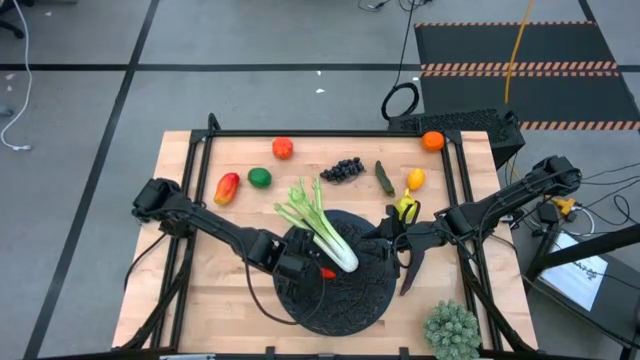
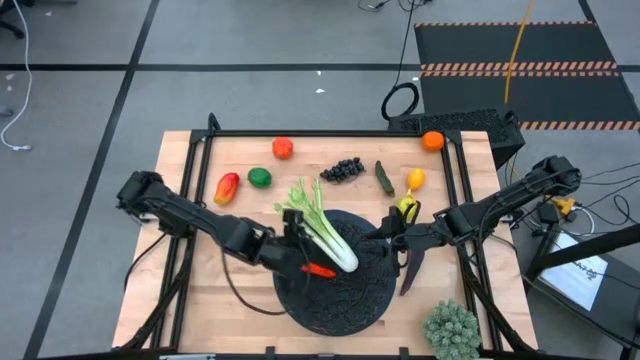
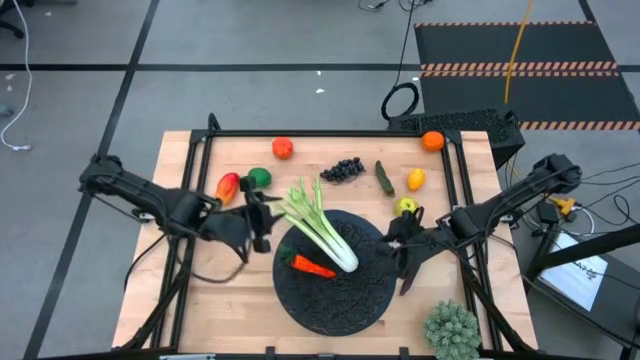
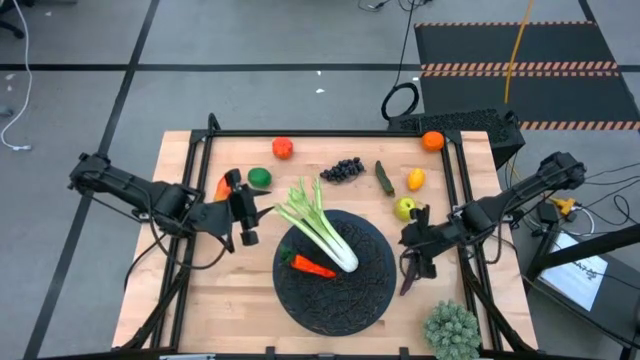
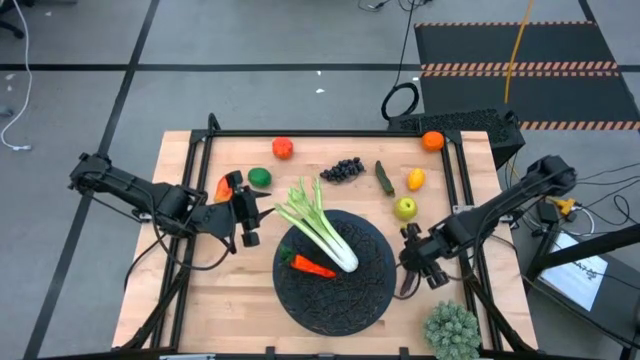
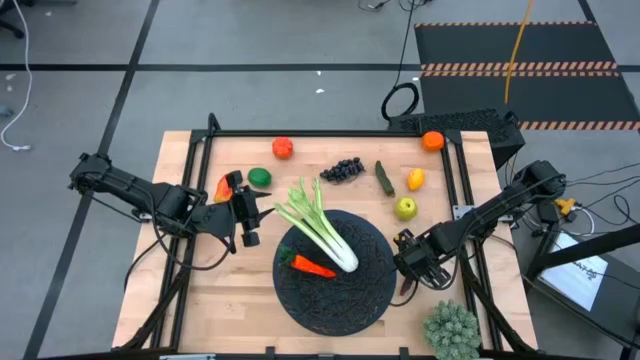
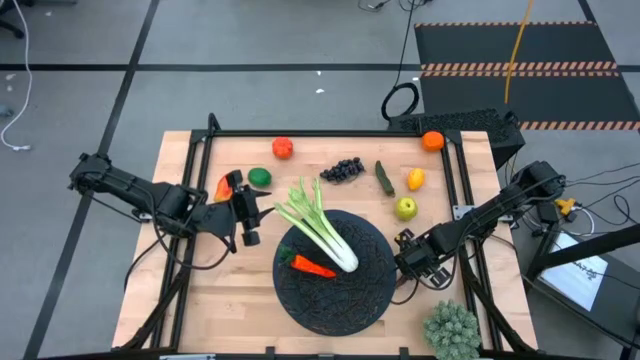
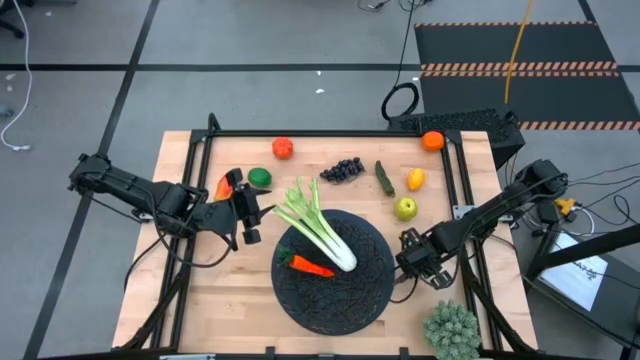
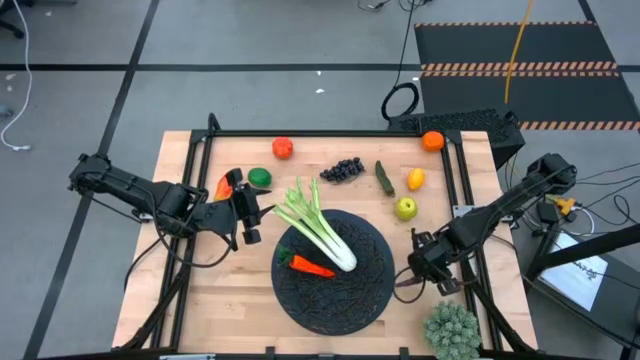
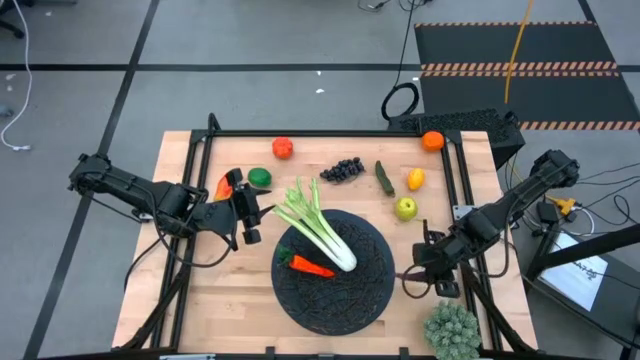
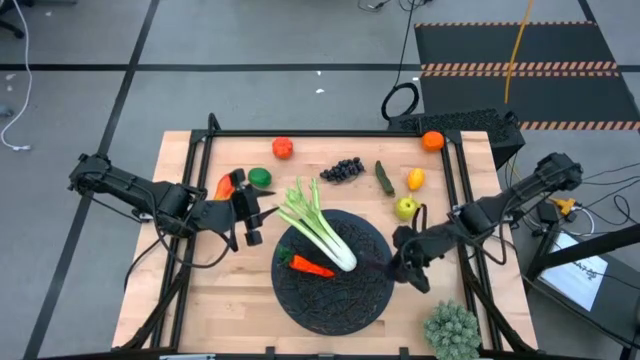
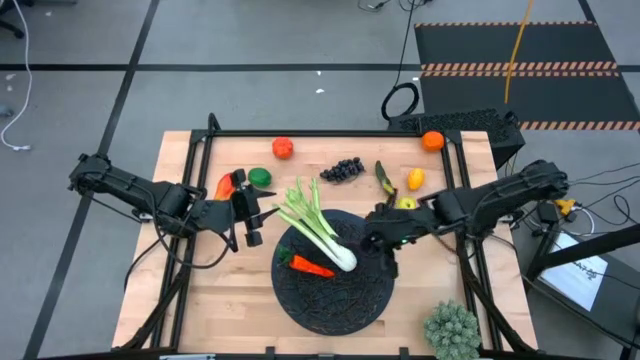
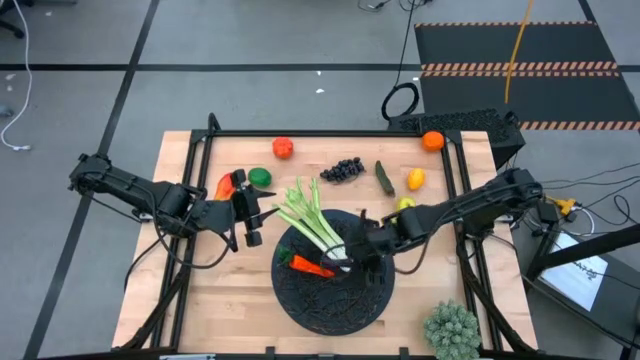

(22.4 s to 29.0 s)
Task: Build produce basket
Put the violet eggplant into the black mesh basket

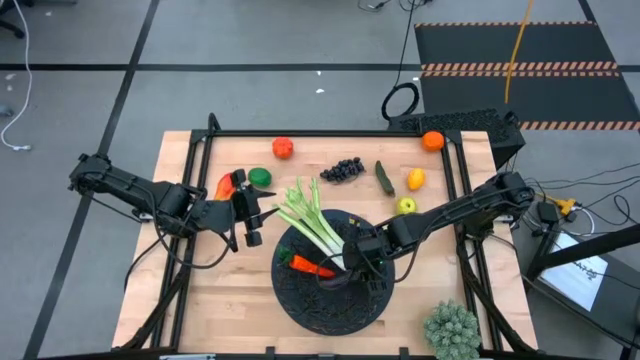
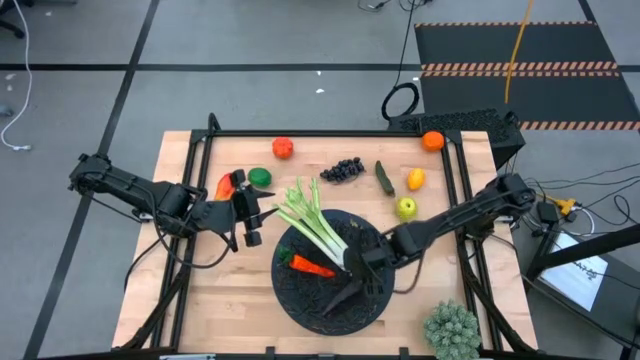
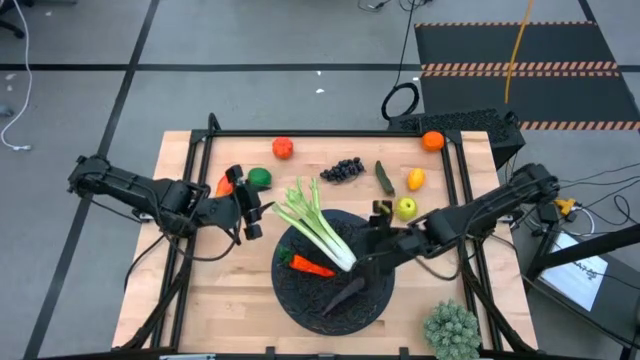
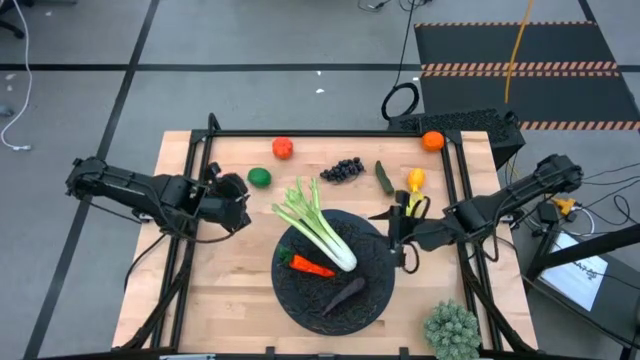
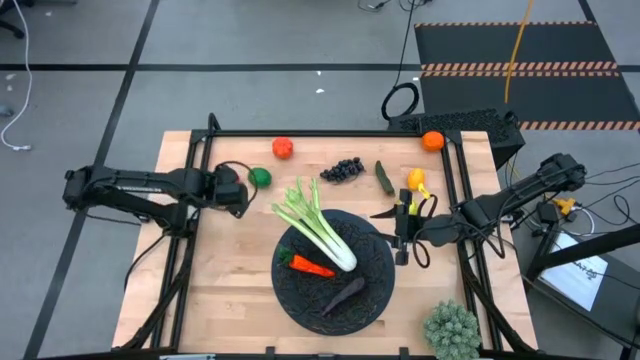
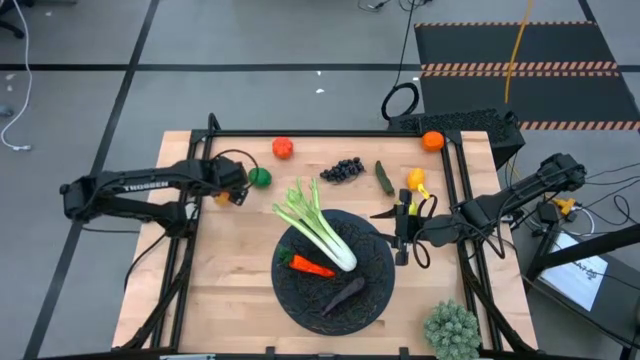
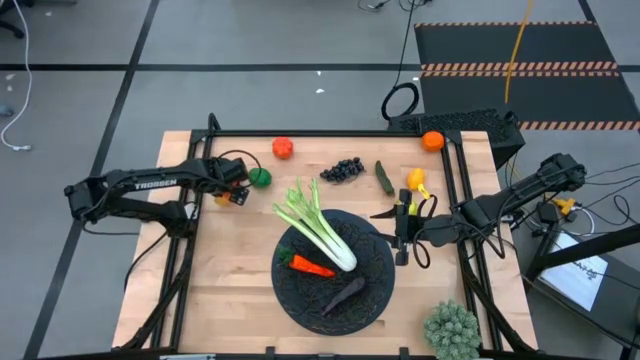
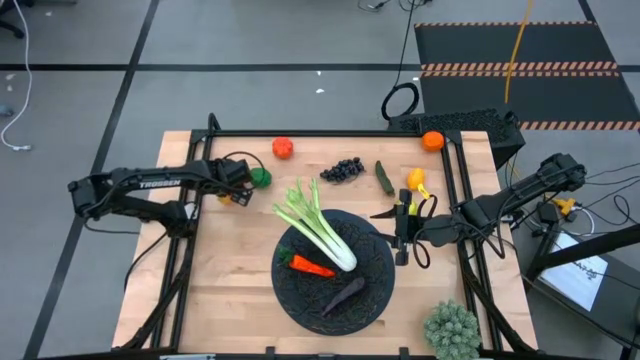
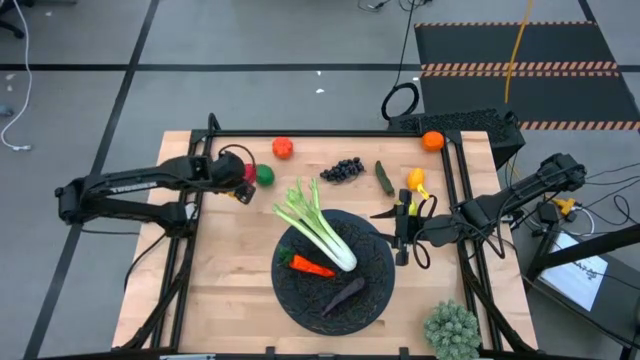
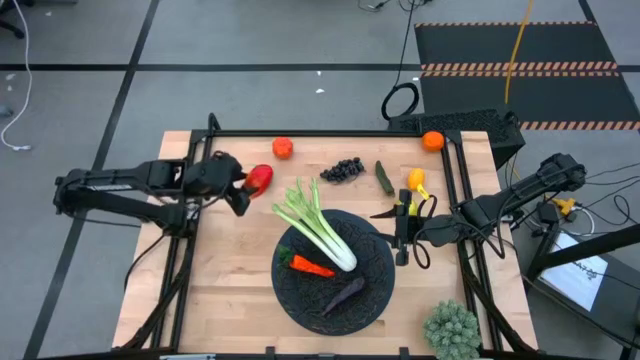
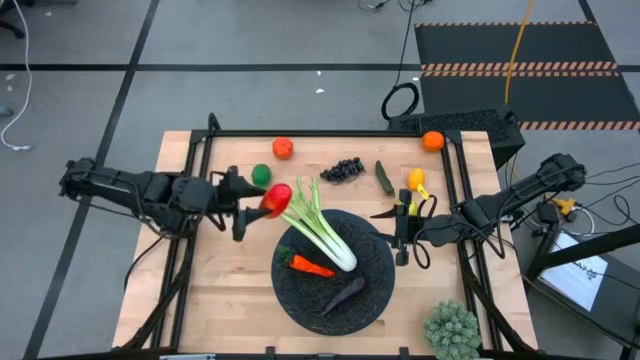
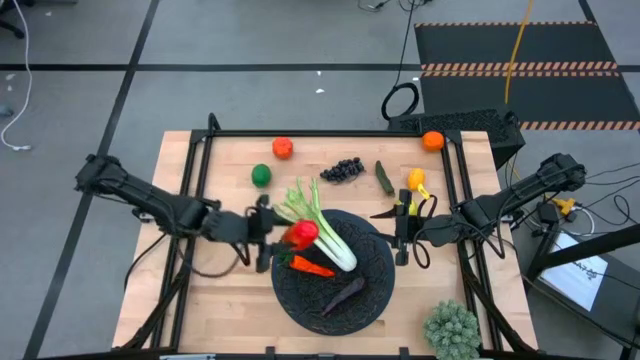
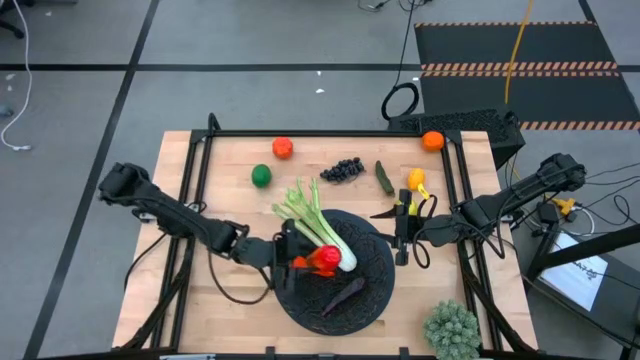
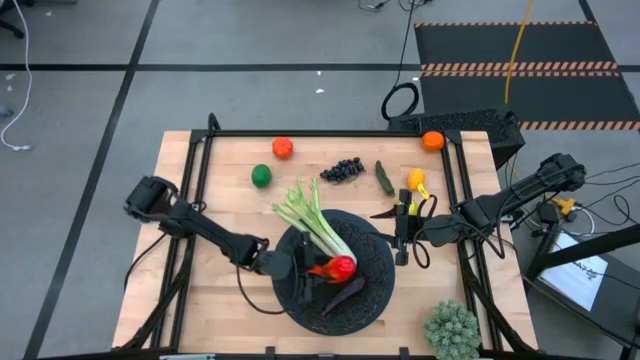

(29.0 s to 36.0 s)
Put the red mango into the black mesh basket

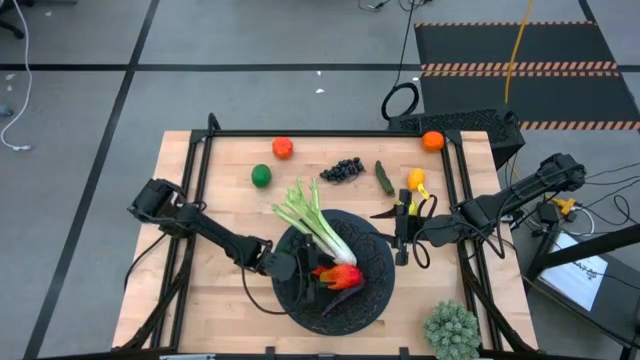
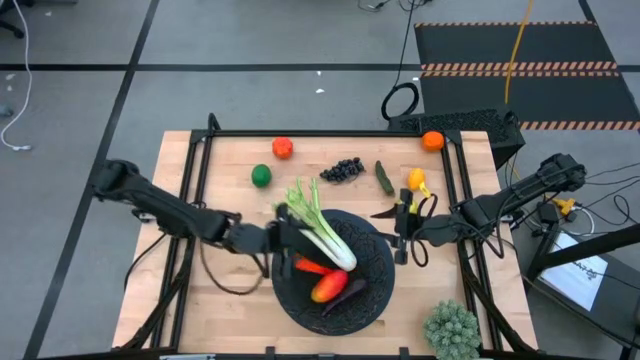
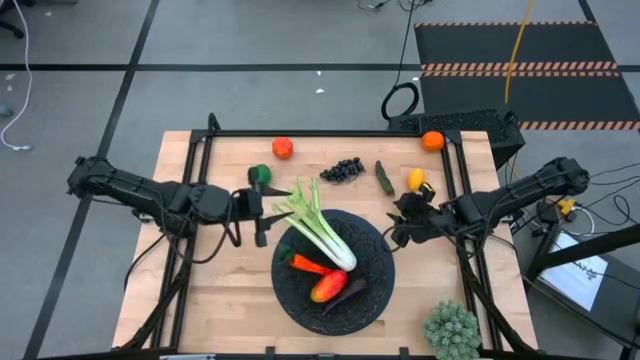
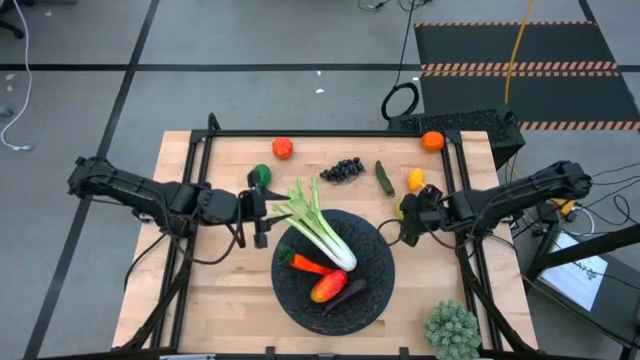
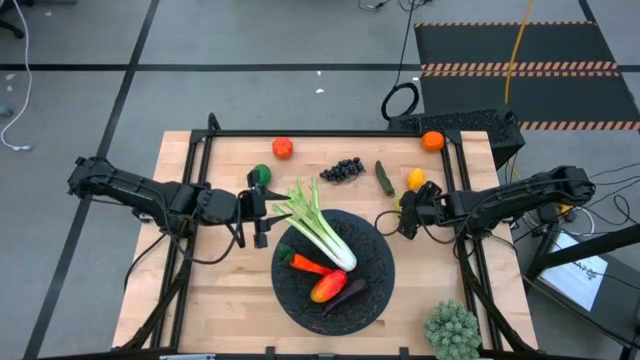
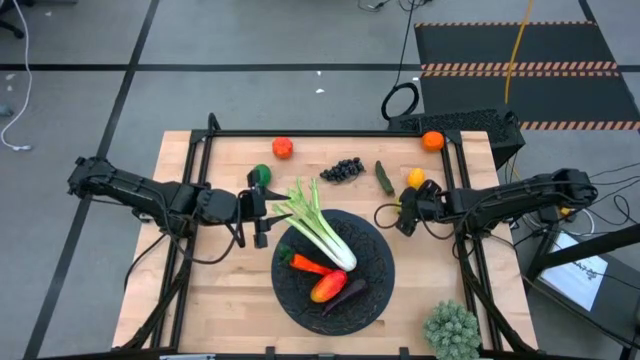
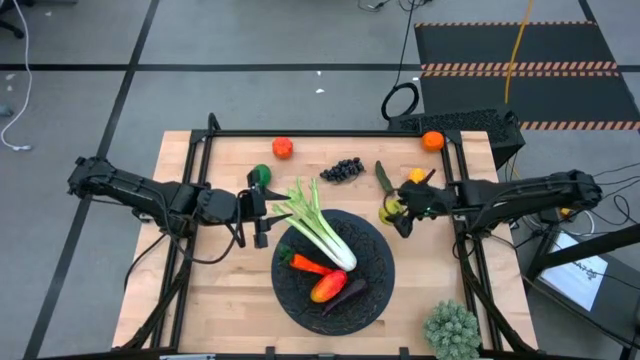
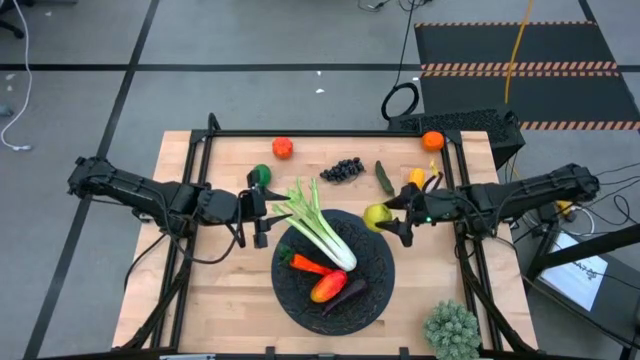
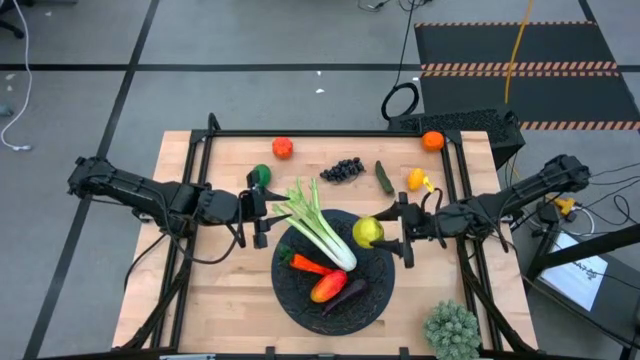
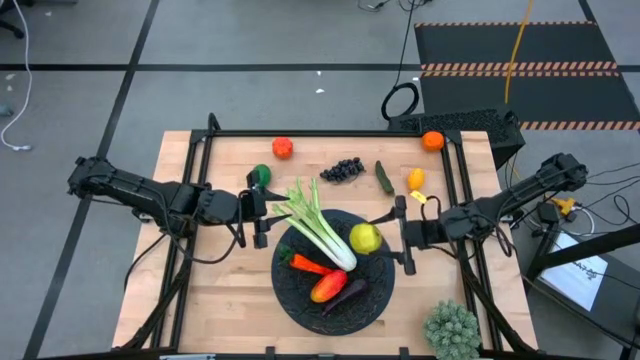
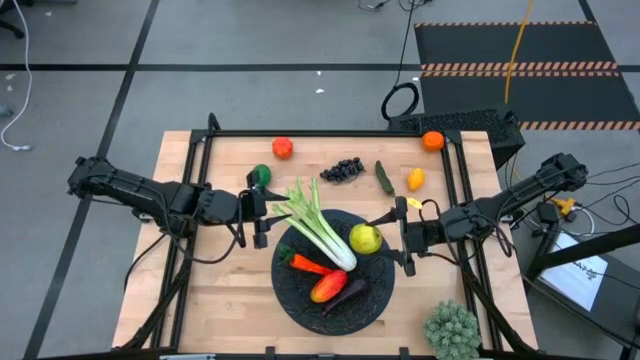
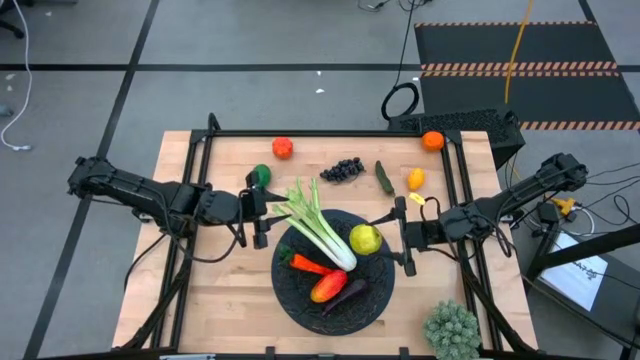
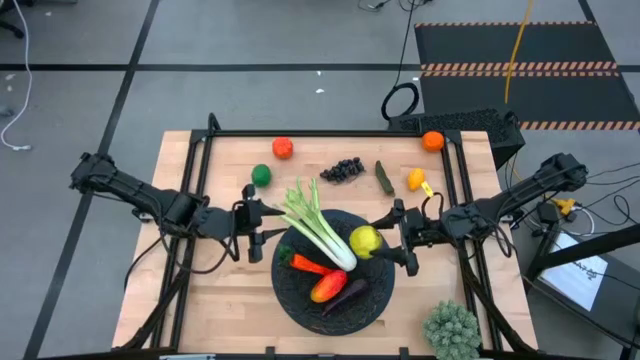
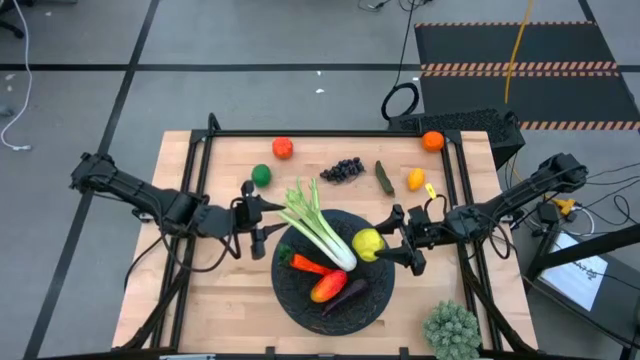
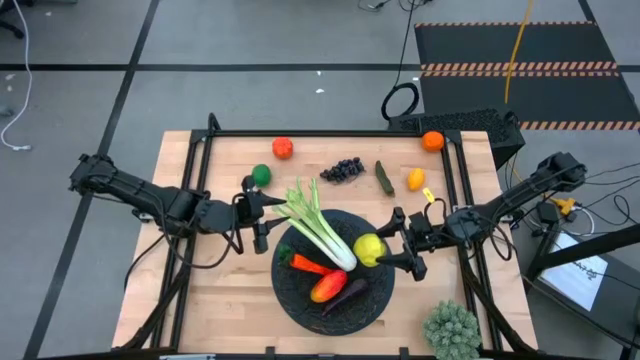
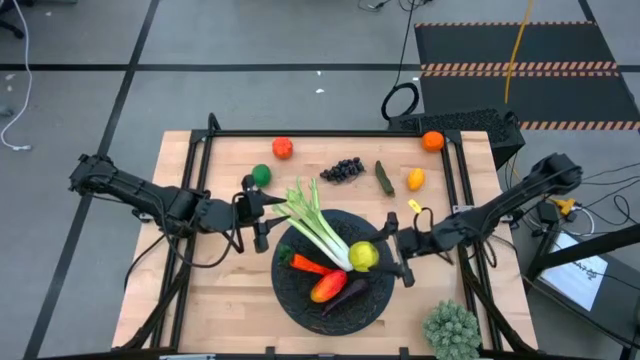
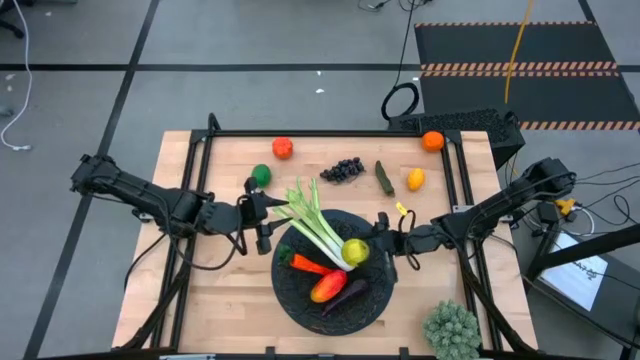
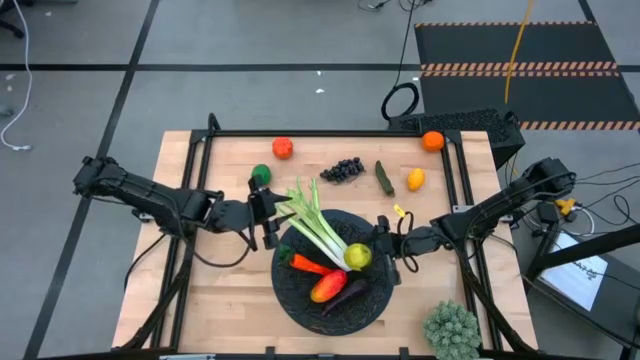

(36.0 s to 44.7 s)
Put the green apple into the black mesh basket
